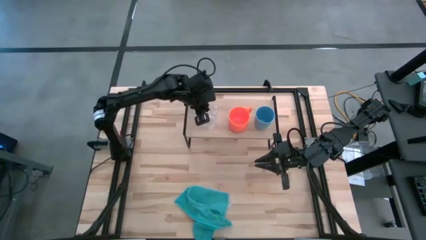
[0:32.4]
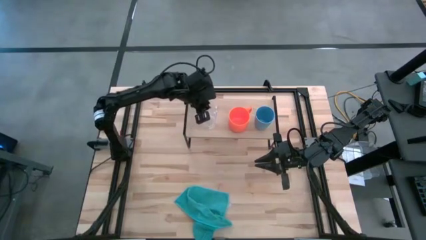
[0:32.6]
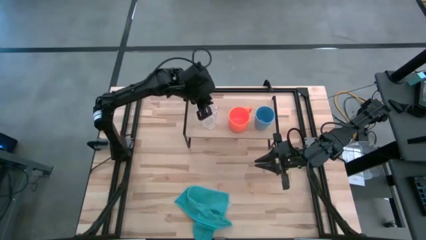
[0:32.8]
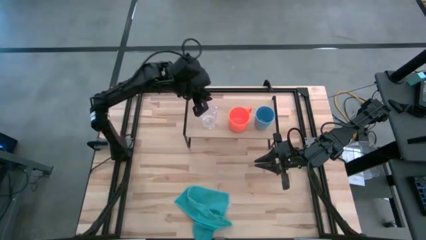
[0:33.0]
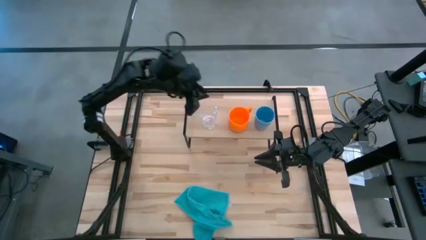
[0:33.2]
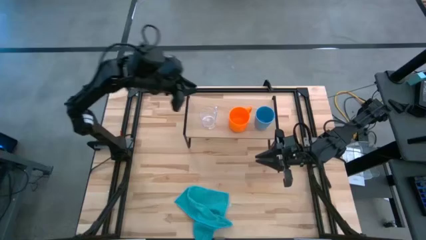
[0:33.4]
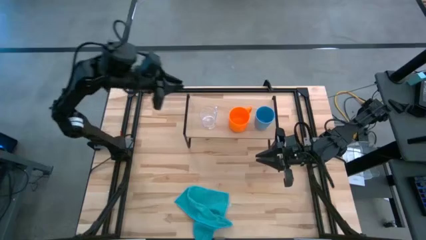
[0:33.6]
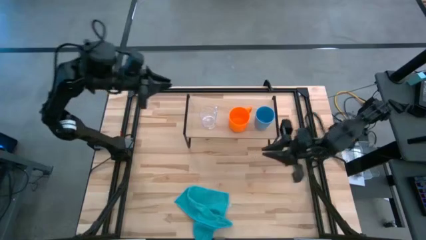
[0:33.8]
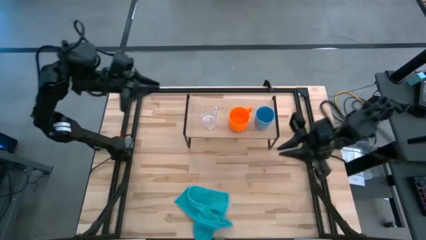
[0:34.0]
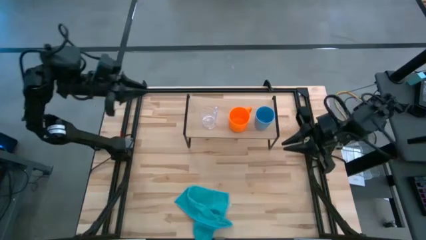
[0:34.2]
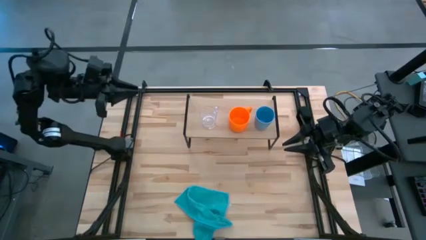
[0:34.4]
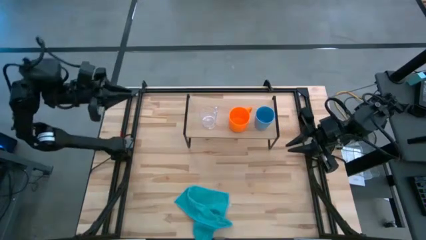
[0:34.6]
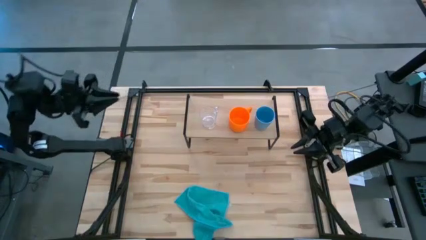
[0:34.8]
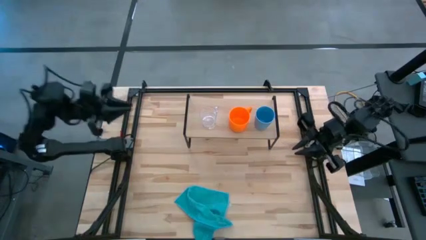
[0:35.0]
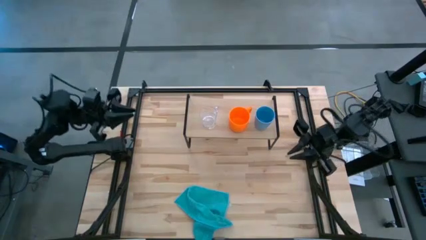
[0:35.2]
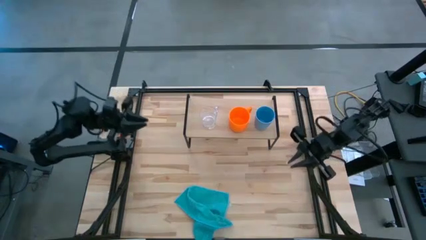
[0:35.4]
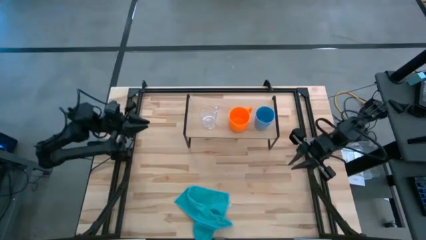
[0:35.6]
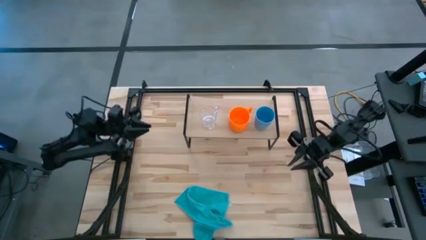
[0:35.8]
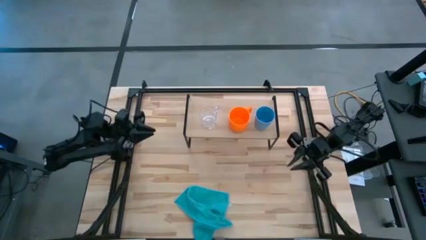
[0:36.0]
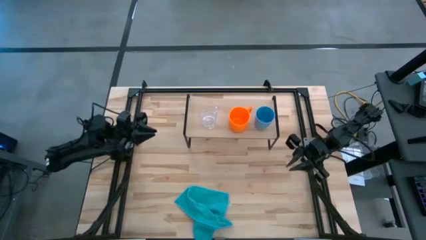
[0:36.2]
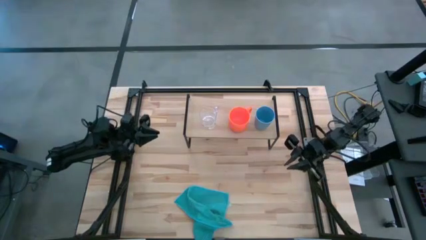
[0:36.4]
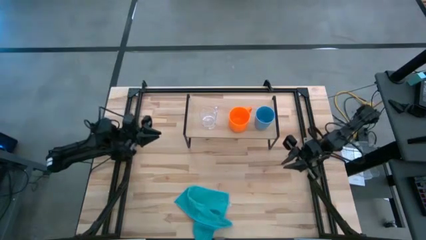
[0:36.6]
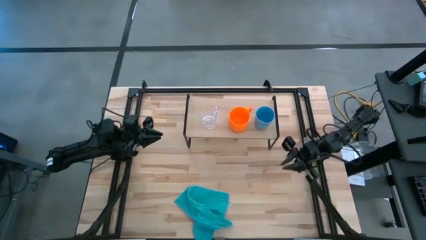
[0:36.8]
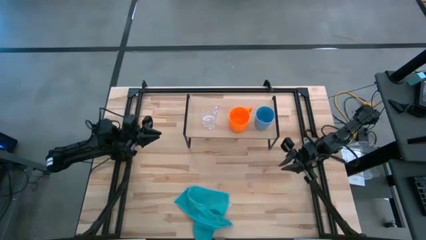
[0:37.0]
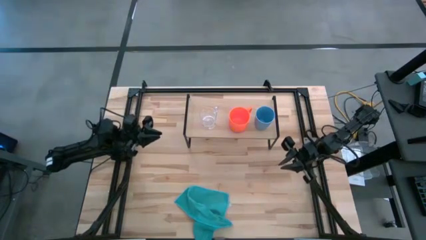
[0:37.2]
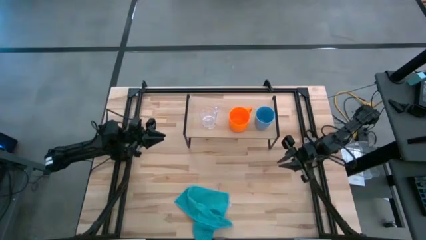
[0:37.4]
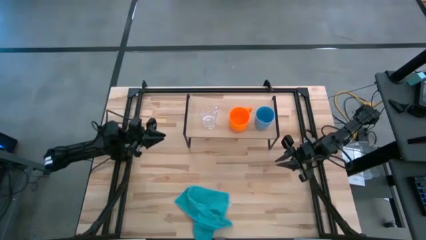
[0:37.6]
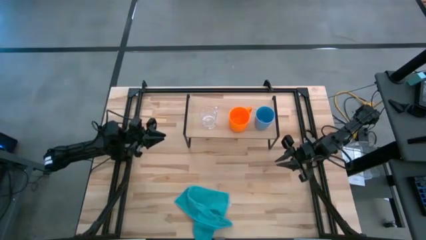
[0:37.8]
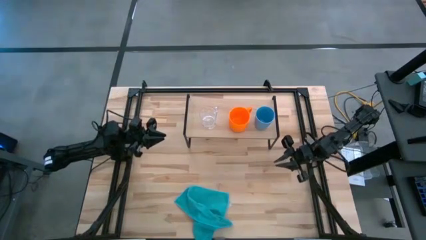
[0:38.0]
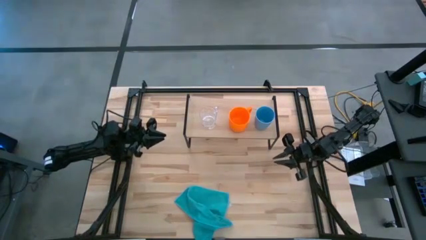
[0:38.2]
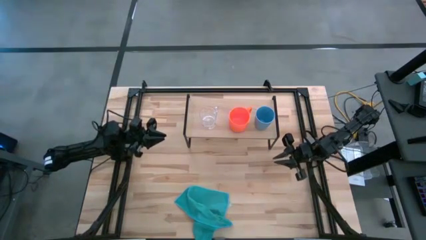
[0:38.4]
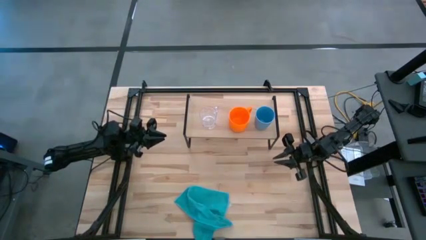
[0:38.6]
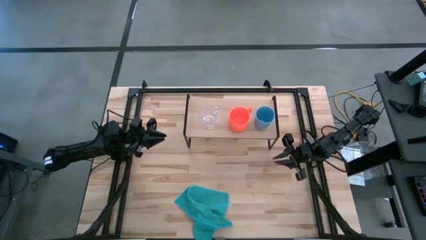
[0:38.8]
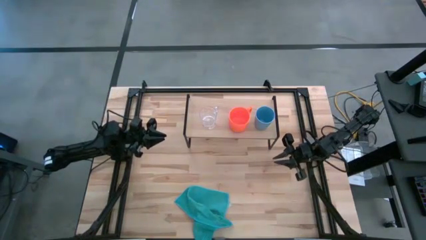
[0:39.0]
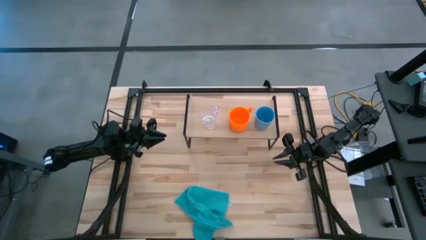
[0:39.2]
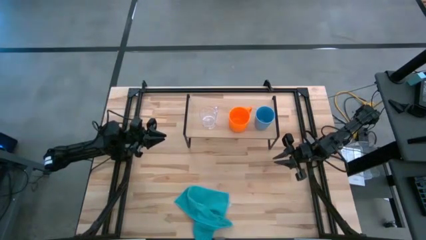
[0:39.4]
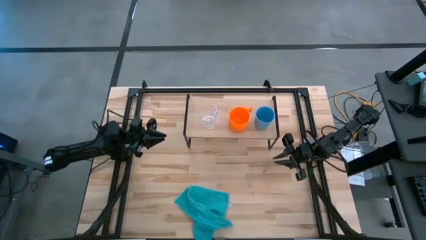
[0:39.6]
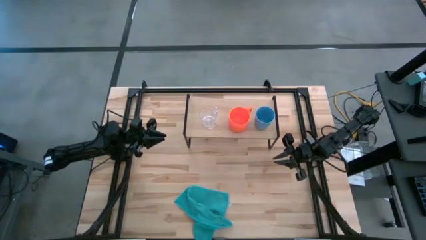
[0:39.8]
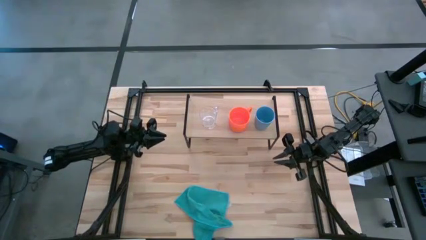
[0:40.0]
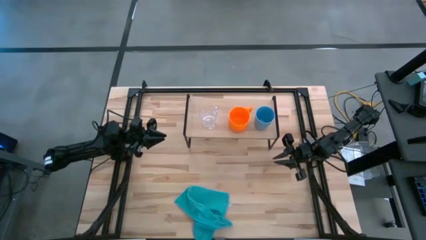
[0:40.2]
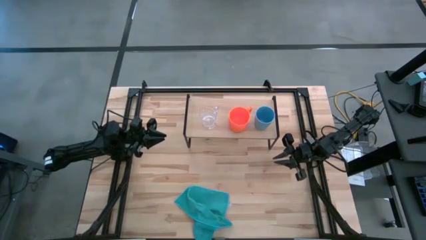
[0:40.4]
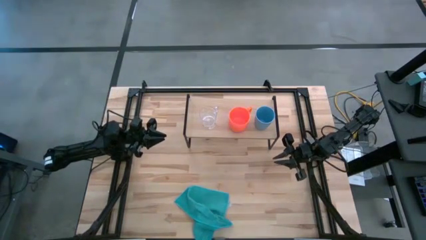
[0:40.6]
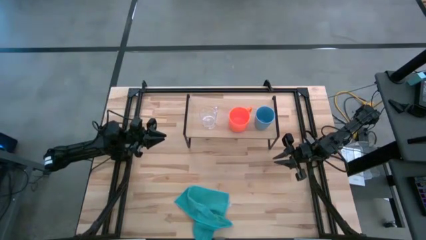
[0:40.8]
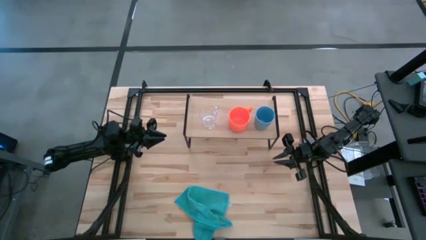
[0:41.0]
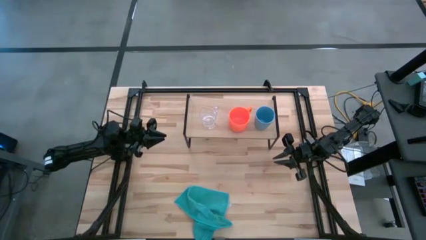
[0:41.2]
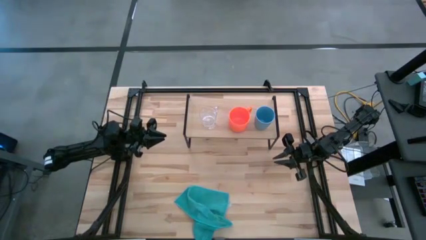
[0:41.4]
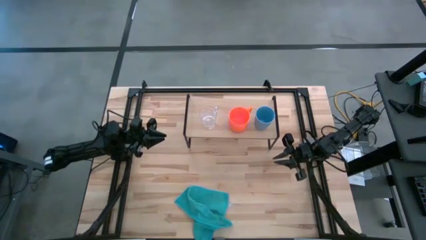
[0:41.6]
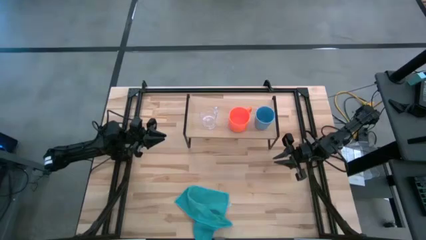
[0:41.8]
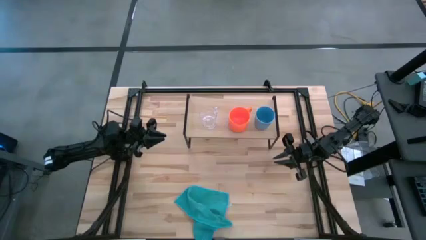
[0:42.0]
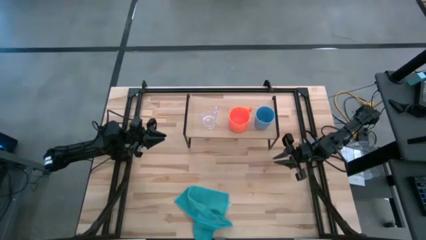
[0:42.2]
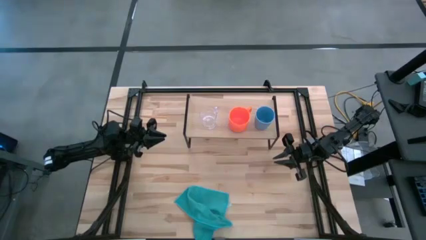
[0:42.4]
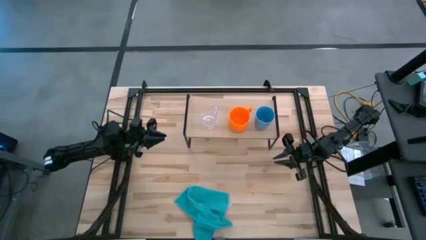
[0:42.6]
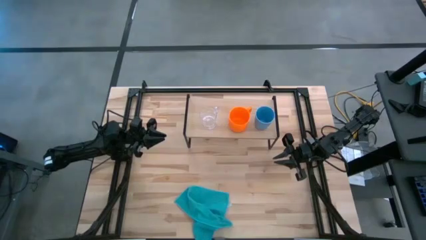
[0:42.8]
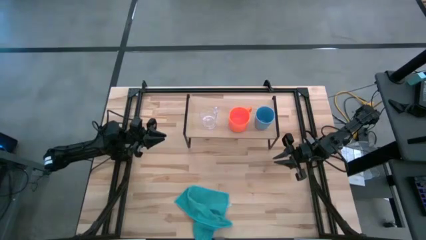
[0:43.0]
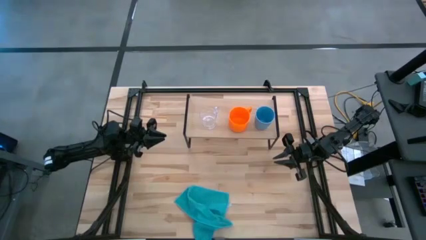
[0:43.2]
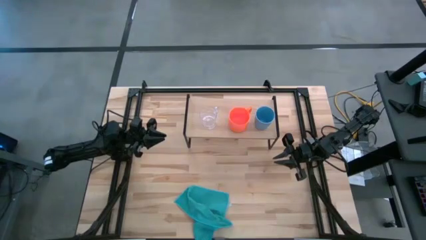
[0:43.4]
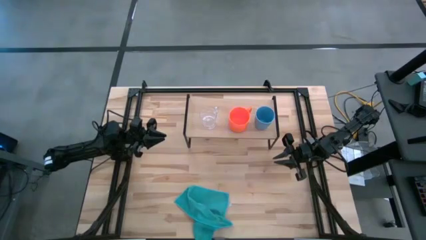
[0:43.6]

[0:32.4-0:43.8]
Task: Stack small to large cups/mugs on shelf
Return to Home Position
